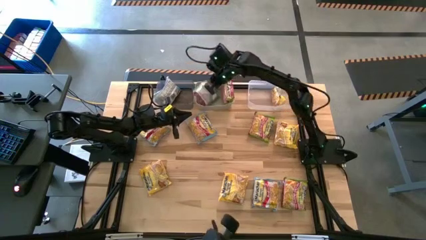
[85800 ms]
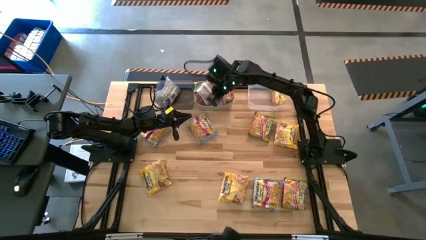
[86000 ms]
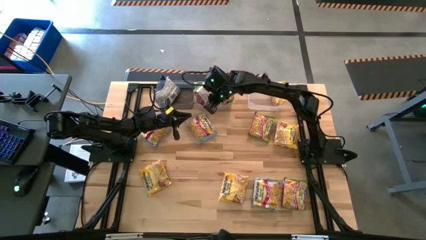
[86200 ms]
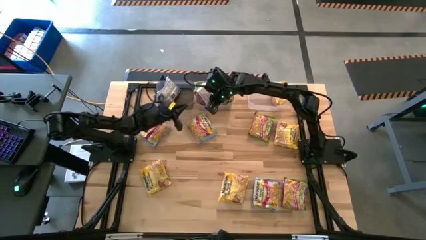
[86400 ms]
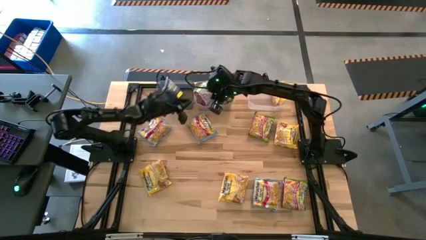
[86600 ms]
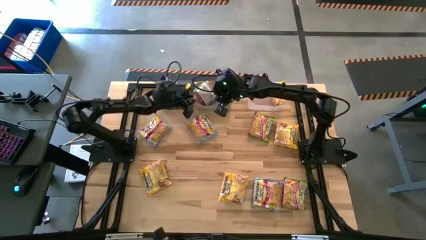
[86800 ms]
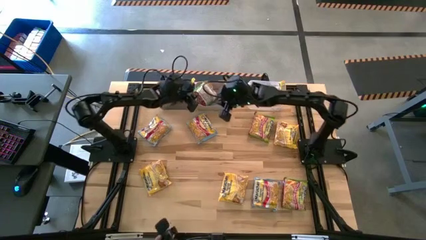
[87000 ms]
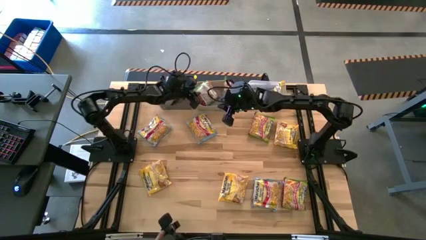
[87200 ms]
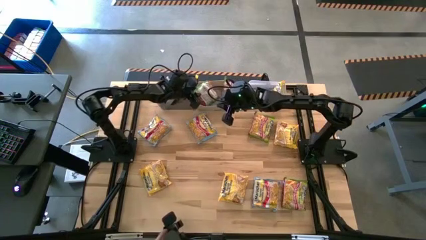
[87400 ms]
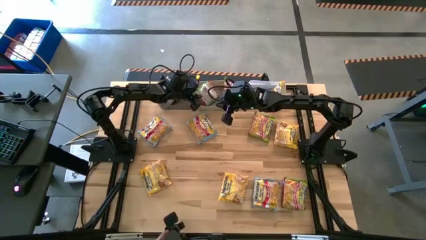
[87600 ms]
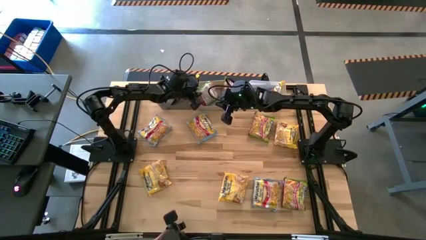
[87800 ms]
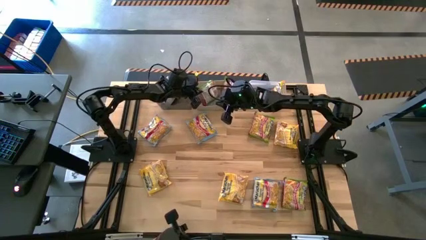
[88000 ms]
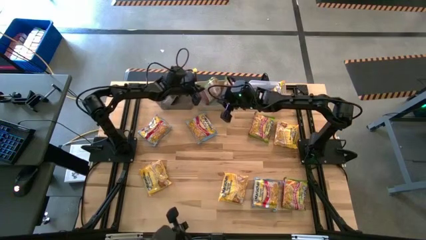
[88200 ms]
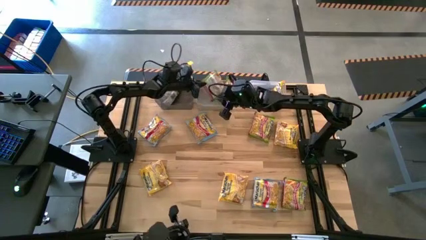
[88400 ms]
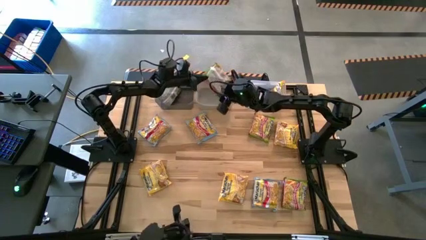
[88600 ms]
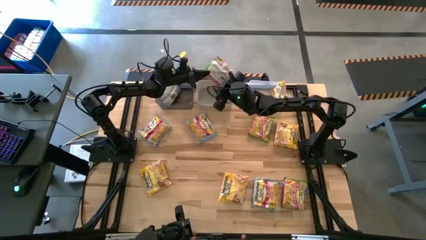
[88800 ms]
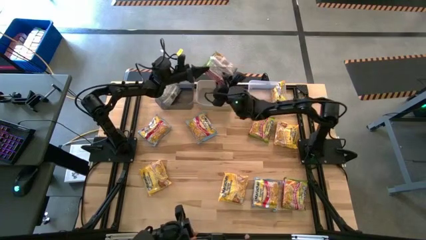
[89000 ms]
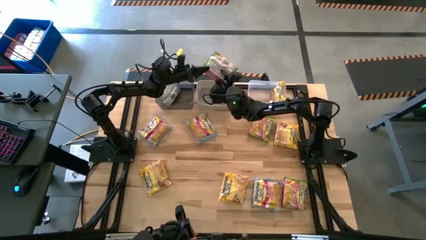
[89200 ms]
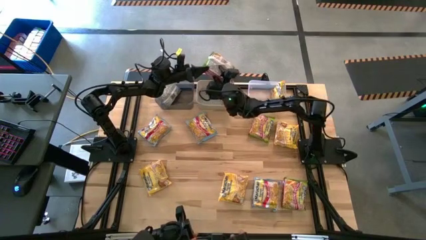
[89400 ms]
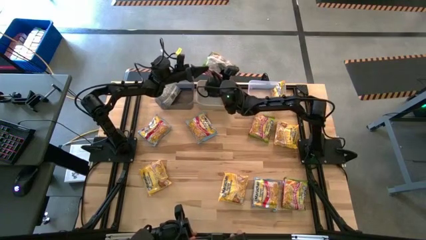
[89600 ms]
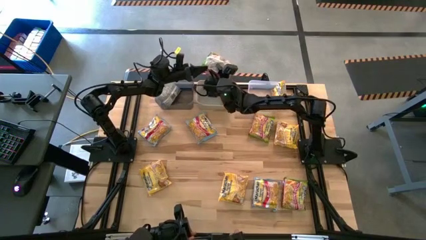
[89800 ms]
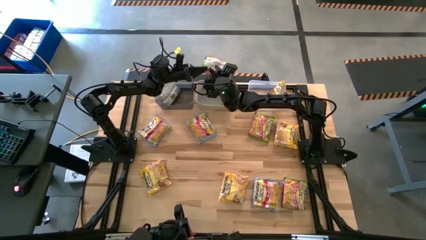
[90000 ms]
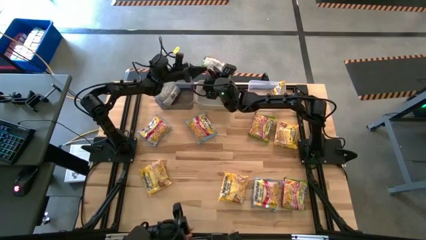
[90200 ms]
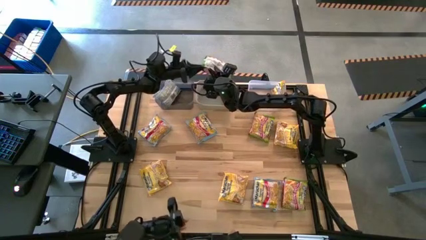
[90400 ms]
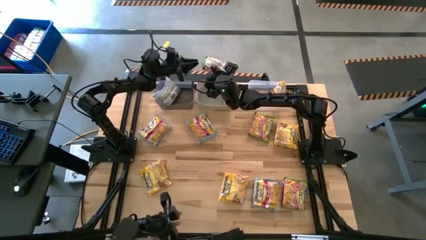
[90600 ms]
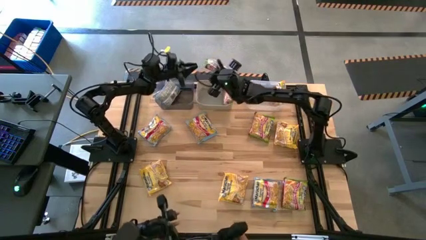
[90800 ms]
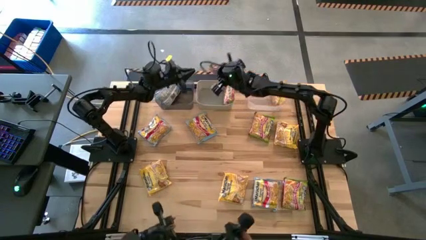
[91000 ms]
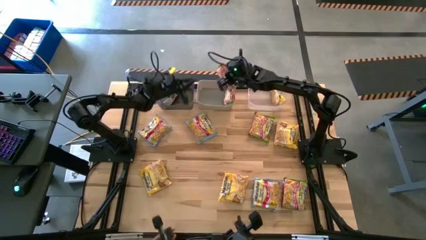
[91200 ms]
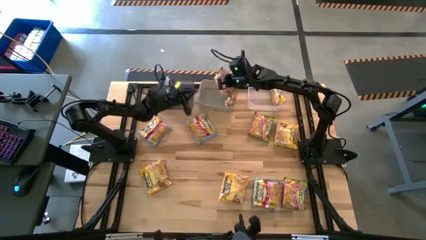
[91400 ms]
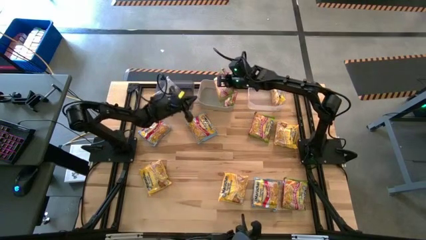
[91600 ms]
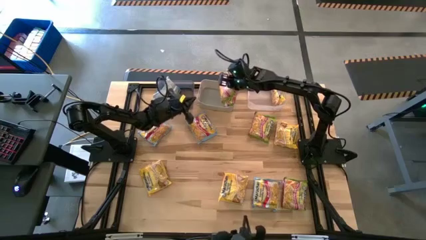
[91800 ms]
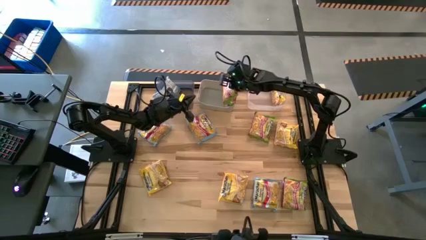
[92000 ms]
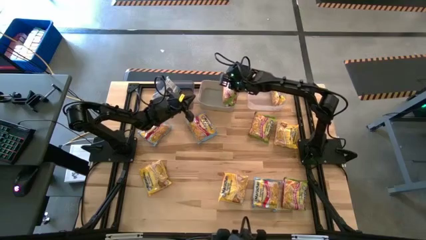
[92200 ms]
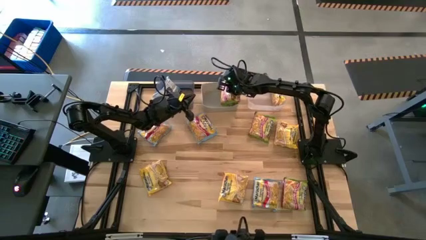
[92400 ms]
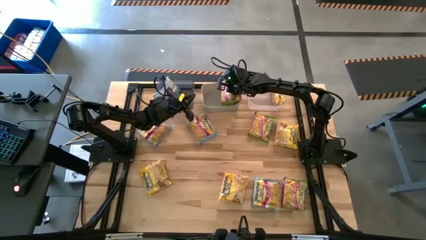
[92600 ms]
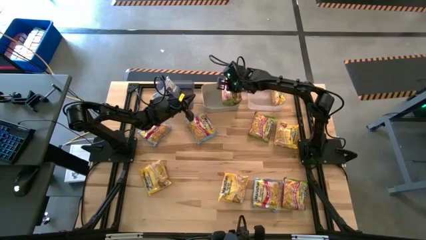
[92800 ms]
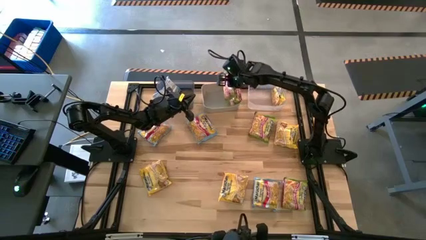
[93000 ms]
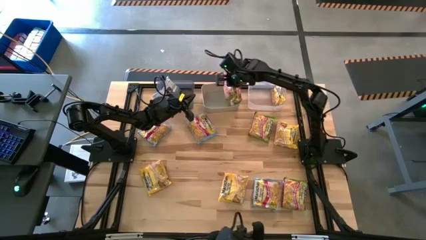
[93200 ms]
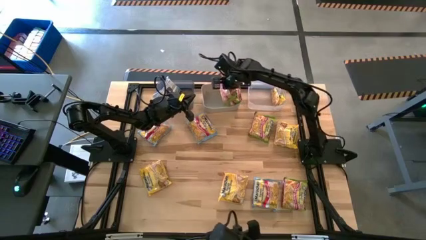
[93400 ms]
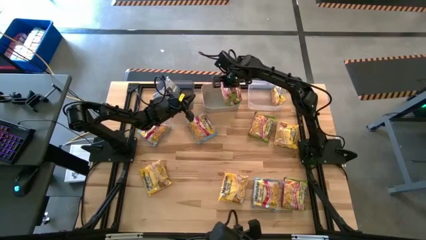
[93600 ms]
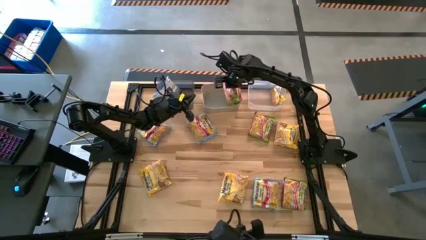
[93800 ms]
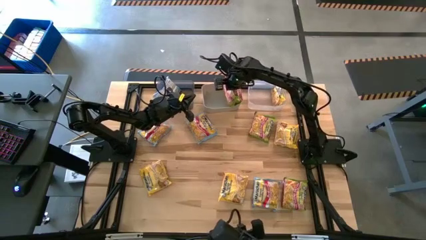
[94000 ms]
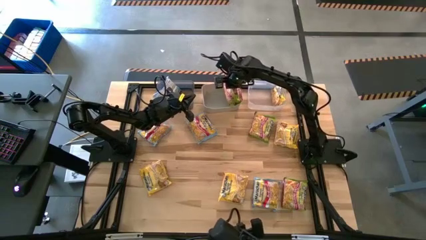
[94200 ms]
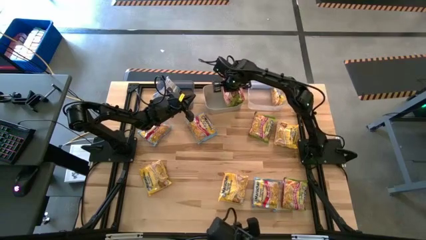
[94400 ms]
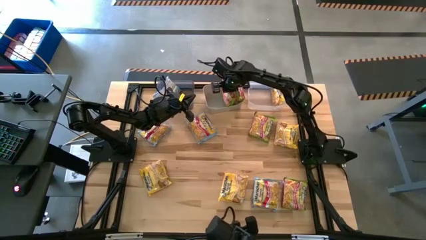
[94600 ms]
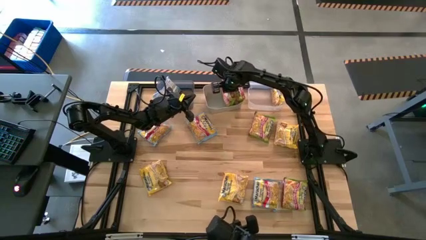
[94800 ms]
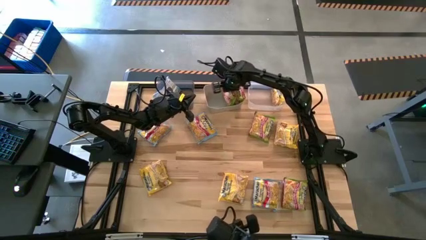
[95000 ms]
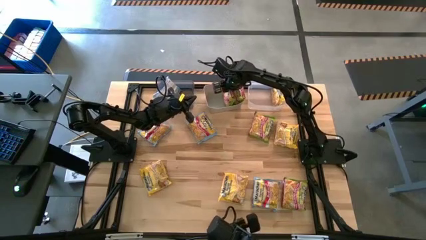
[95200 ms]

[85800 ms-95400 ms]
Task: Sort Maruchan noodles
Put the bottom left green noodle pack into the gray bin

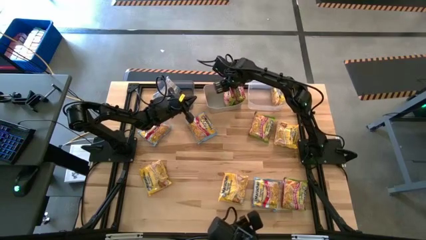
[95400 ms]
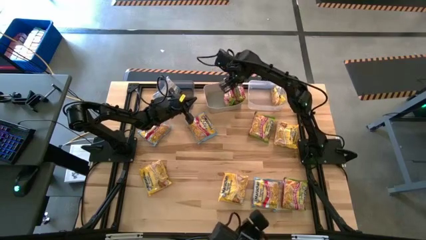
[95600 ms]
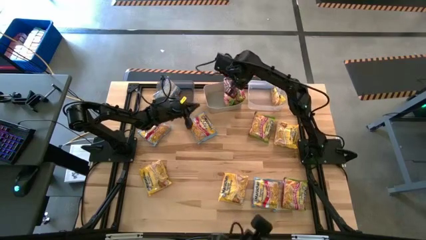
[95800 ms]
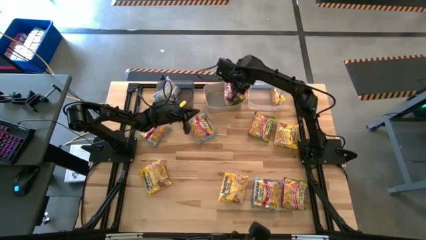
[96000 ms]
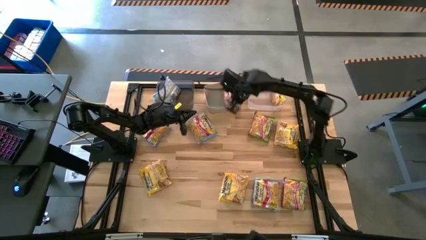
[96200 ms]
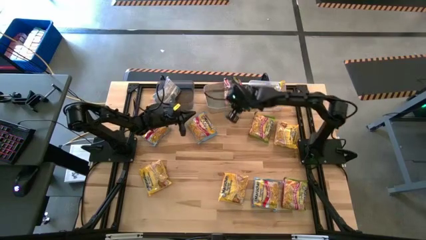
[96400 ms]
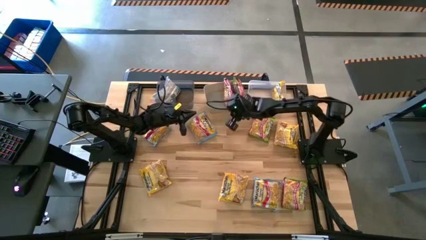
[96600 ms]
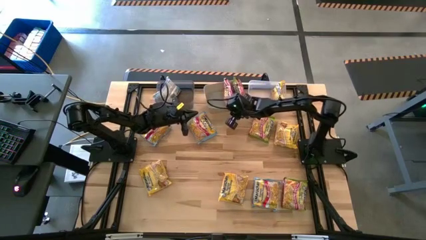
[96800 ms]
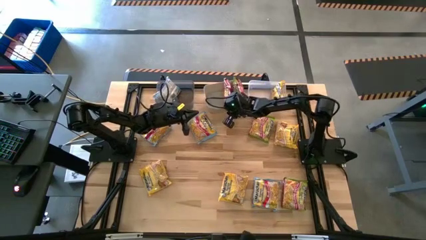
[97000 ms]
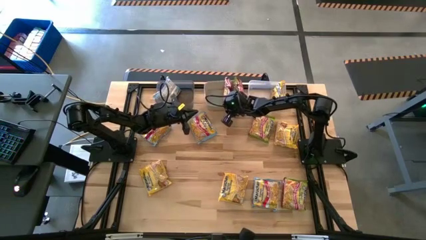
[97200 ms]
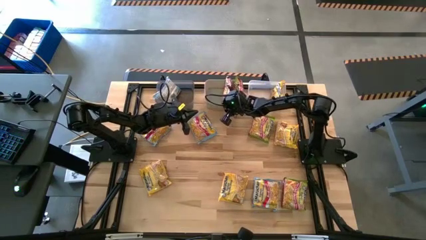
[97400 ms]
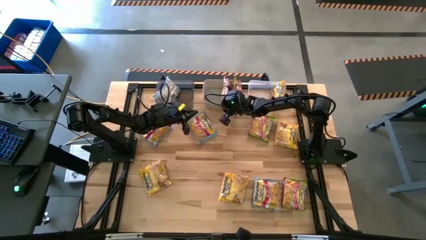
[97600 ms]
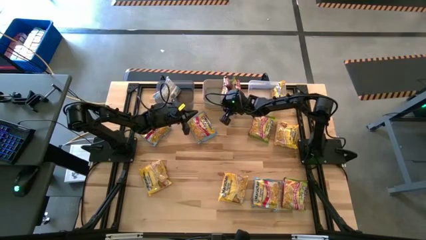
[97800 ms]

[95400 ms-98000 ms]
Adjust the gray bin on the table

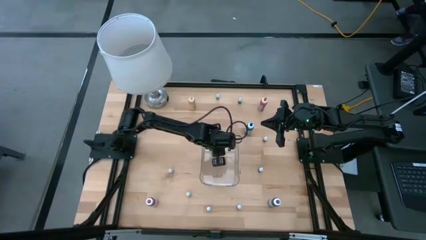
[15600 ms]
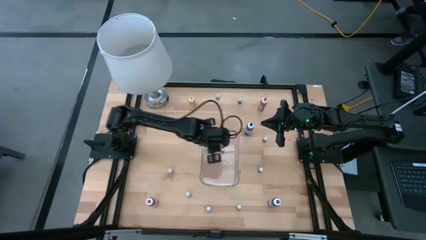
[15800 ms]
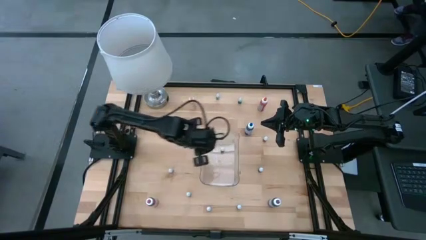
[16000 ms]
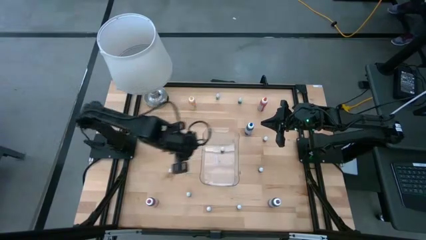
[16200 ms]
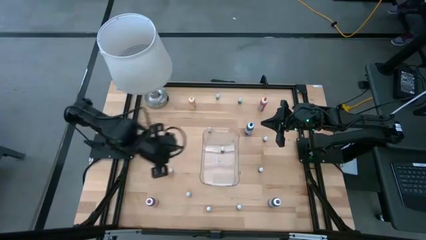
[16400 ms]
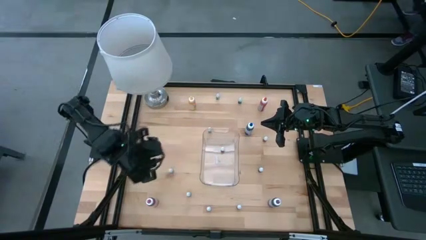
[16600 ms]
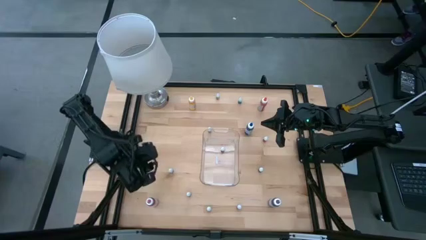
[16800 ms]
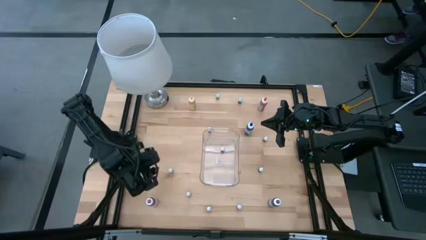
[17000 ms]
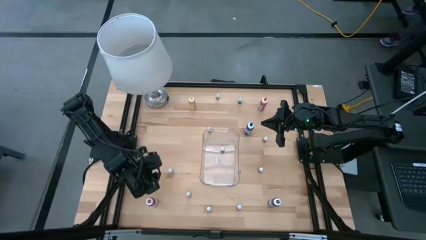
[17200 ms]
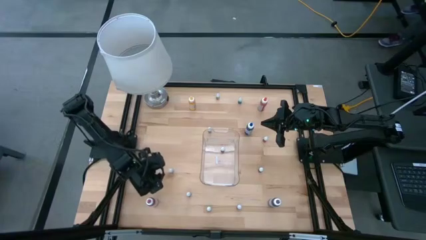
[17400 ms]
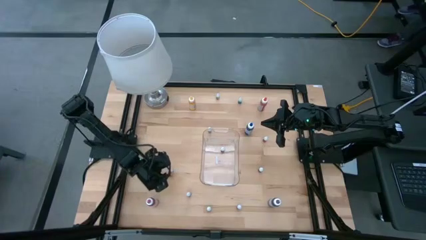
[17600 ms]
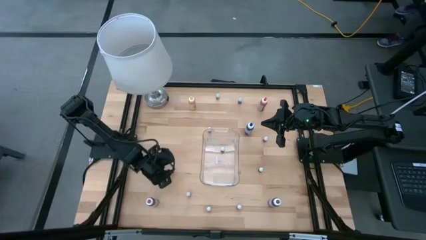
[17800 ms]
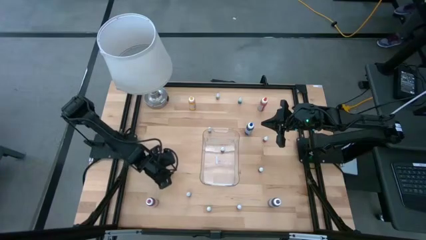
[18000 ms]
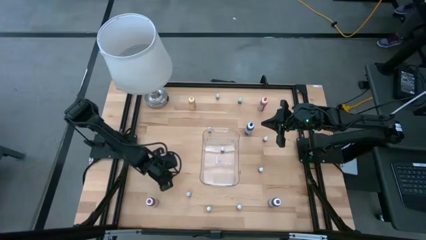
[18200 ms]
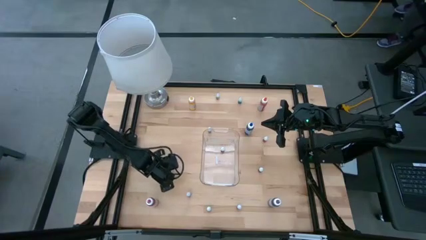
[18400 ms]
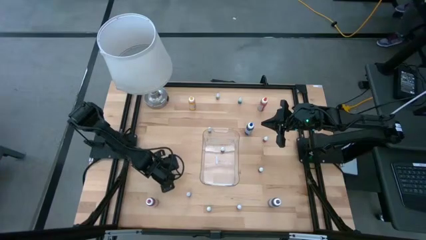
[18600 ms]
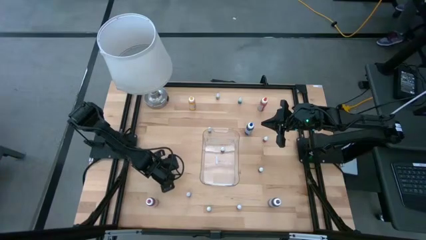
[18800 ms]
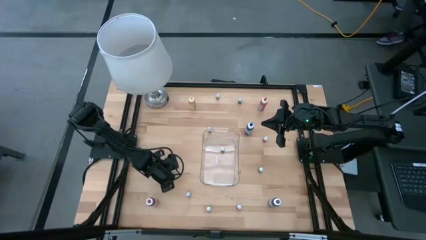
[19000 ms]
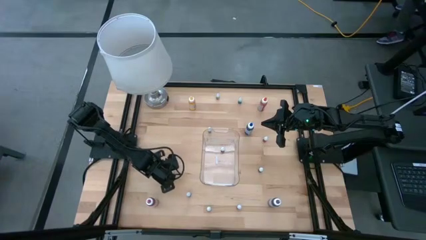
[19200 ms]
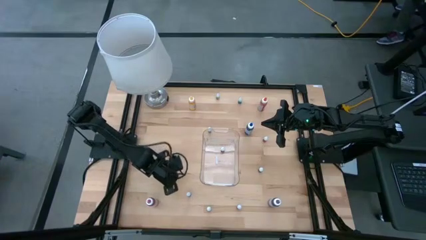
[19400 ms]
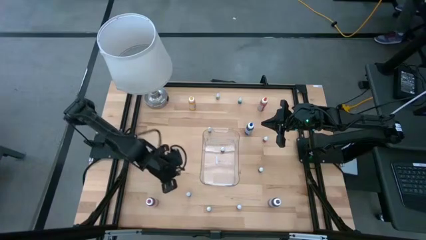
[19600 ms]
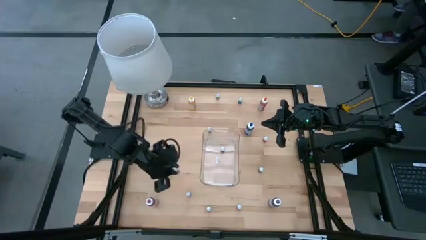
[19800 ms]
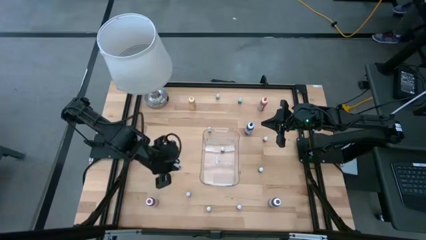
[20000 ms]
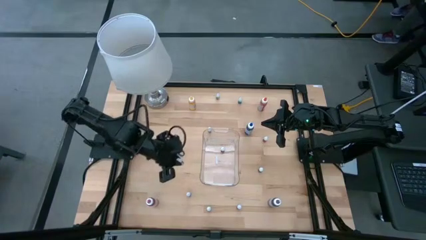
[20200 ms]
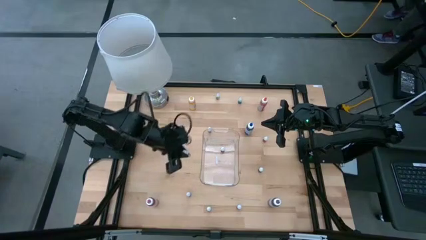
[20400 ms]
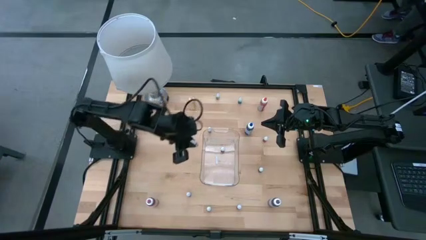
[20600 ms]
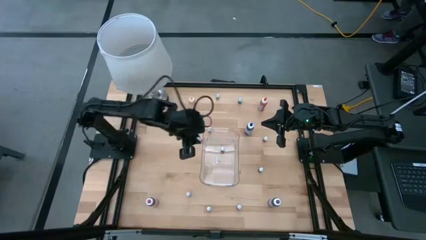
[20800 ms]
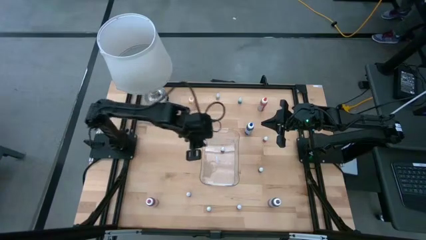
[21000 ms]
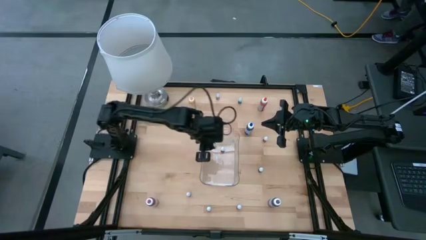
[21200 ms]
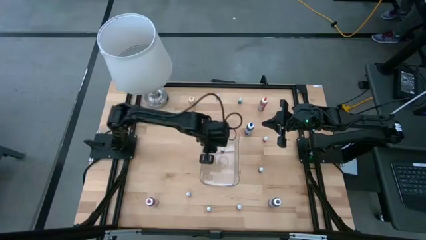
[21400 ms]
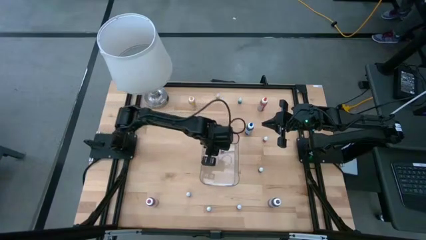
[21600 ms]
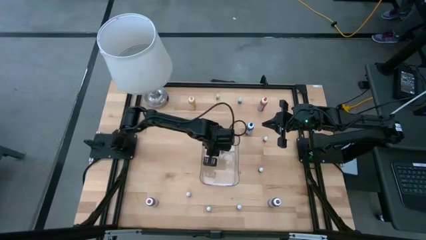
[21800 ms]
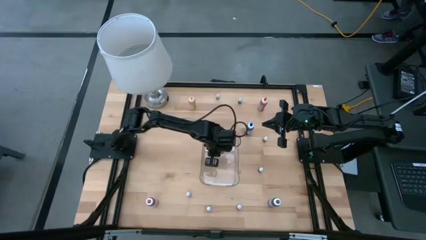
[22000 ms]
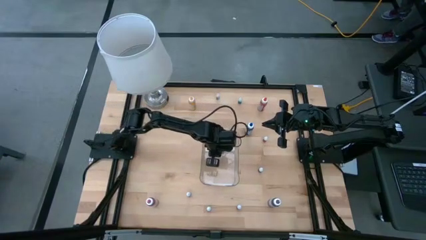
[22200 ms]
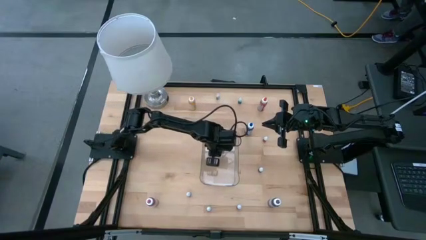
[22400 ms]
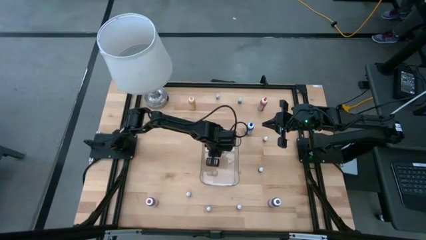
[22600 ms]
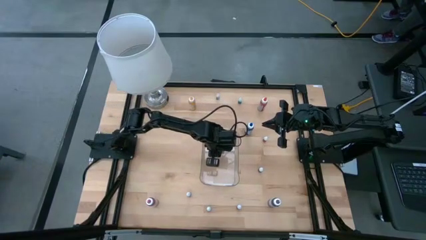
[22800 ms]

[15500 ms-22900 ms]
Task: Pick & Place food coloring
Put the bottom small red food coloring bottle into the transparent container
